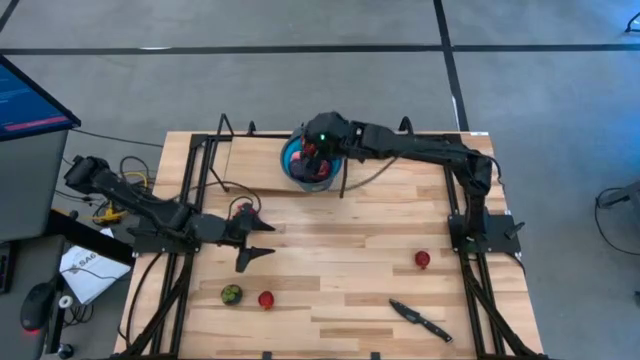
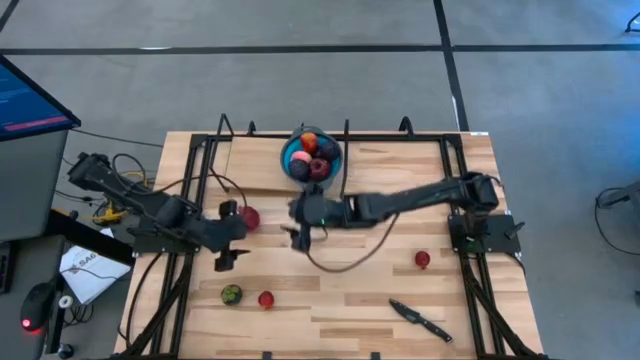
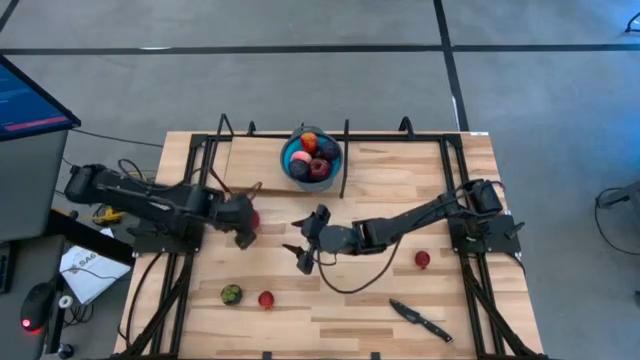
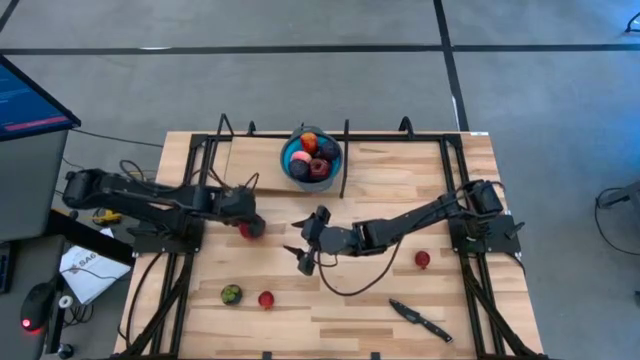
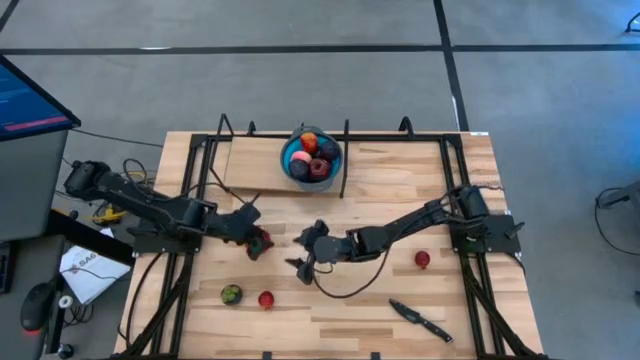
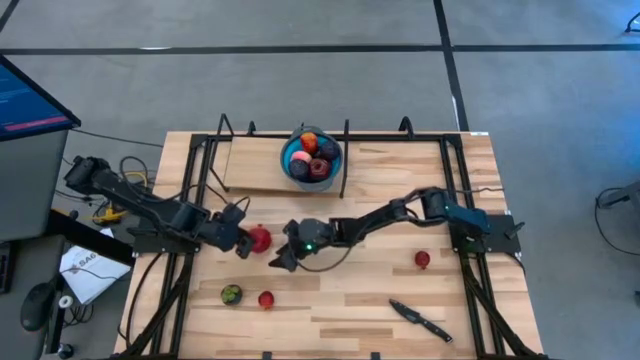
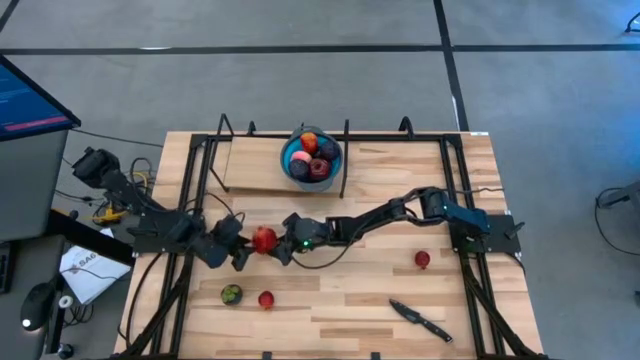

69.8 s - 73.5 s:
Task: Pick & Place Fruit
Put the top left red pomegranate into the blue strainer bowl on the shelf

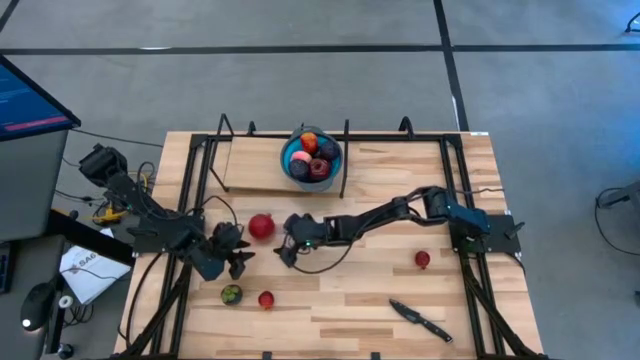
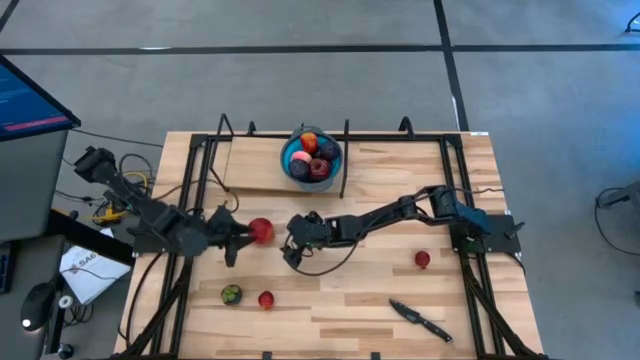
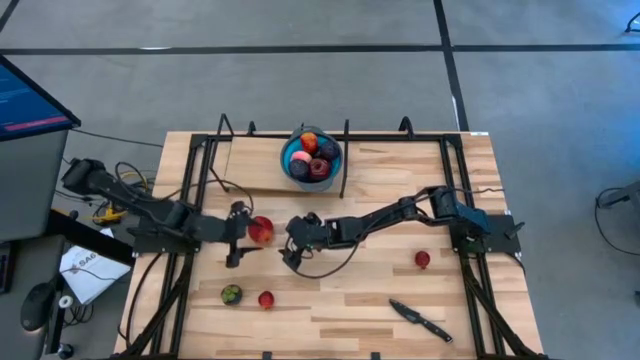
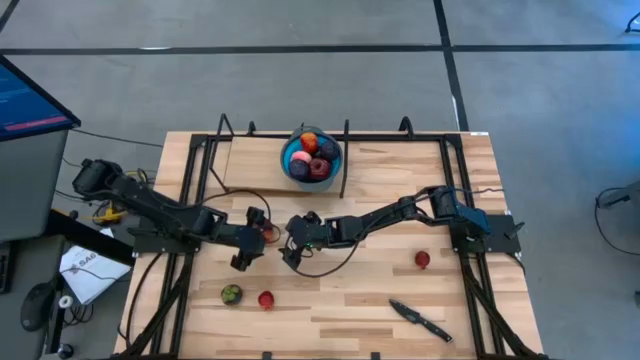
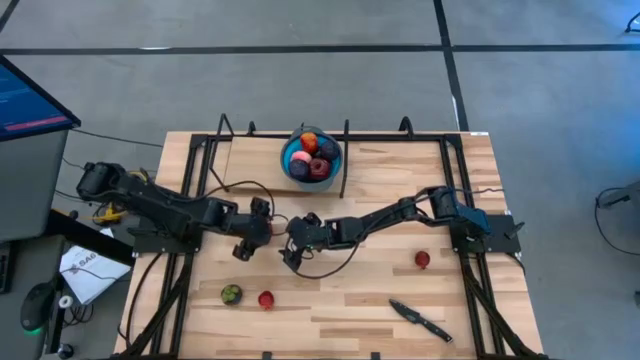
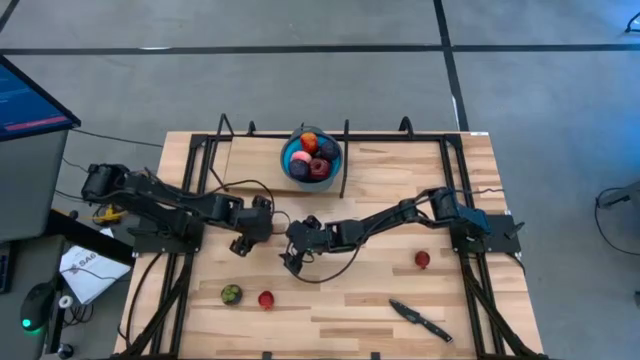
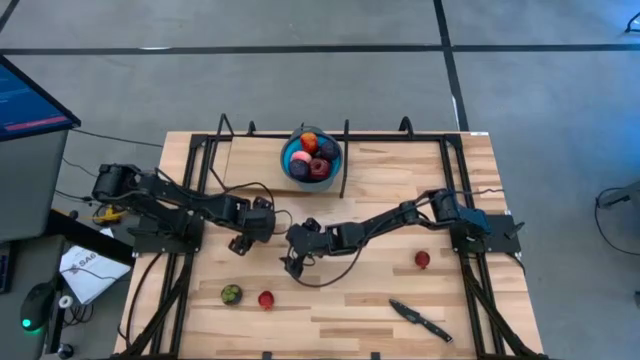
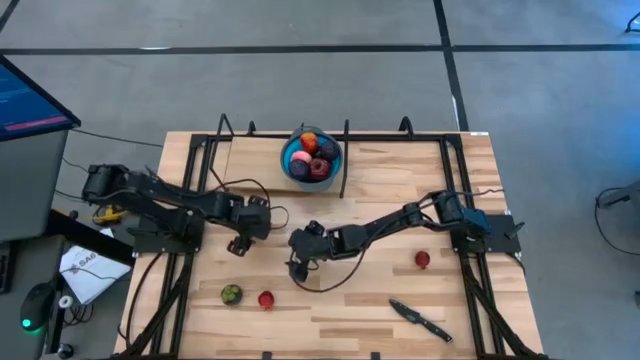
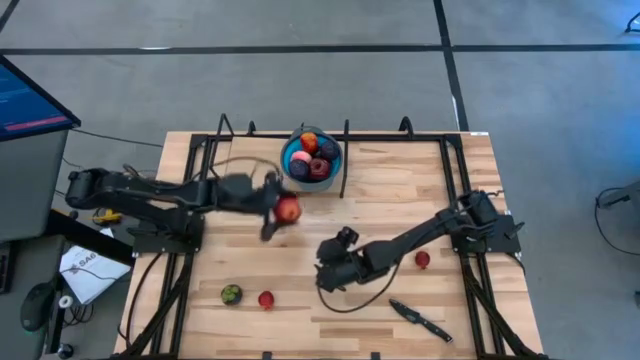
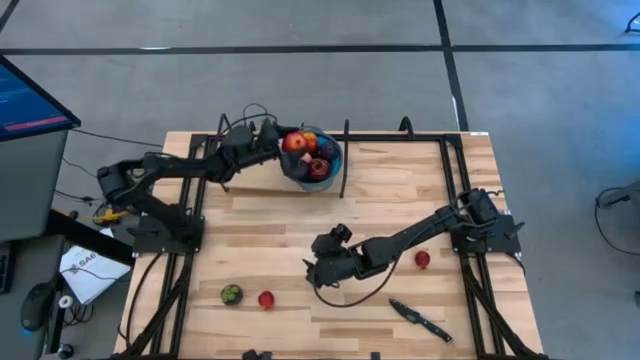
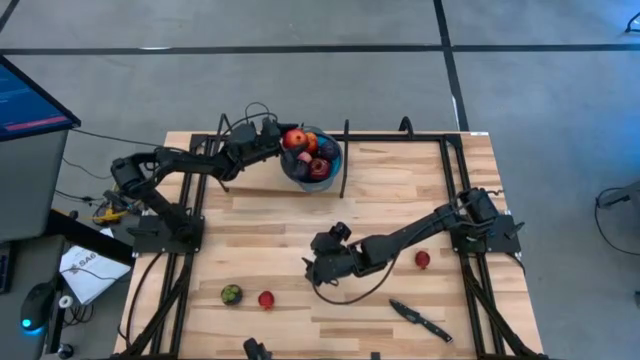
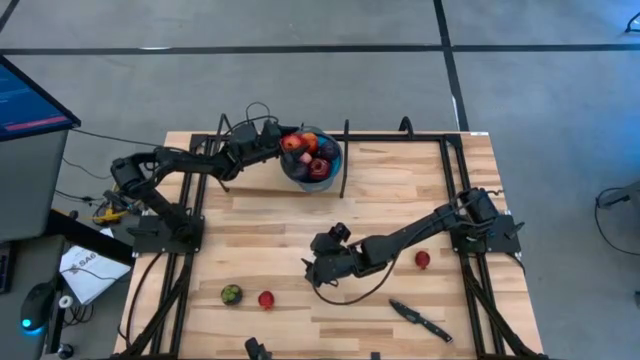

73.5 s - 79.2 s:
Put the top left red pomegranate into the blue strainer bowl on the shelf

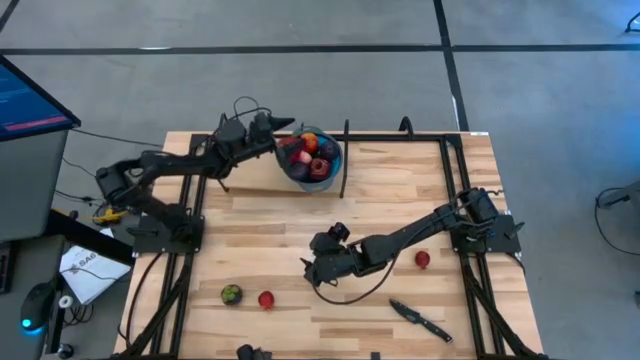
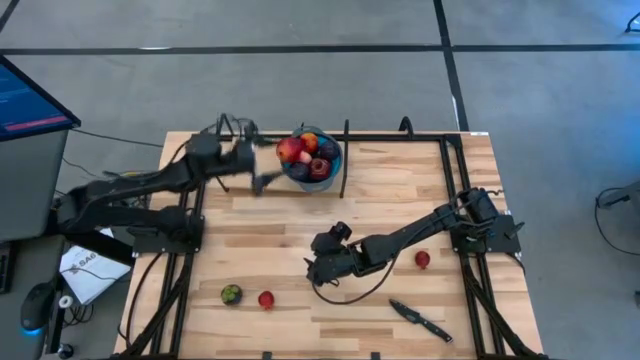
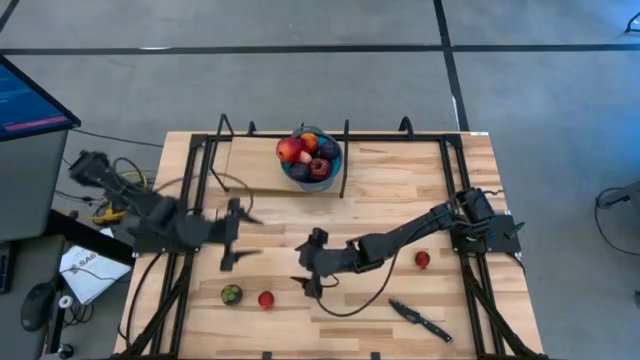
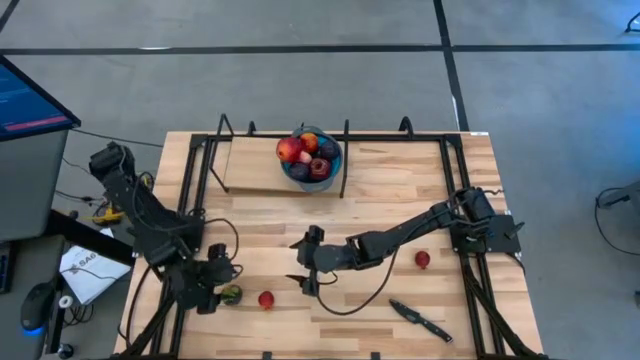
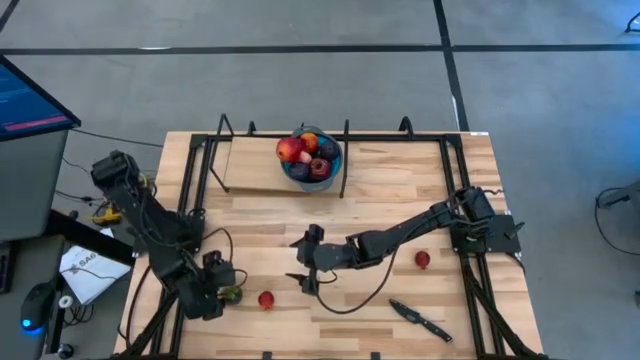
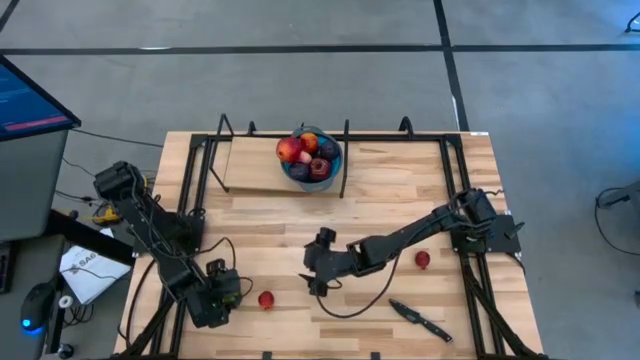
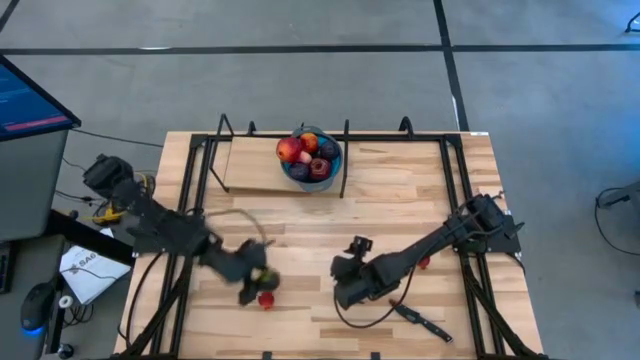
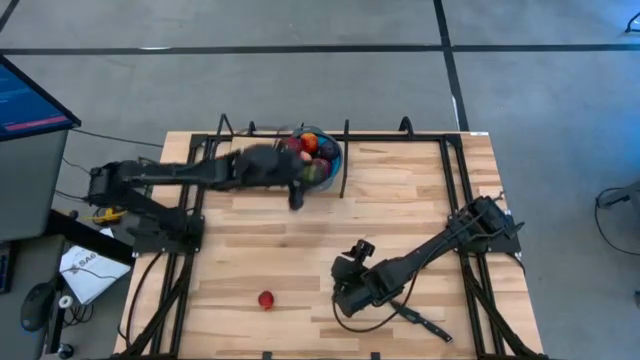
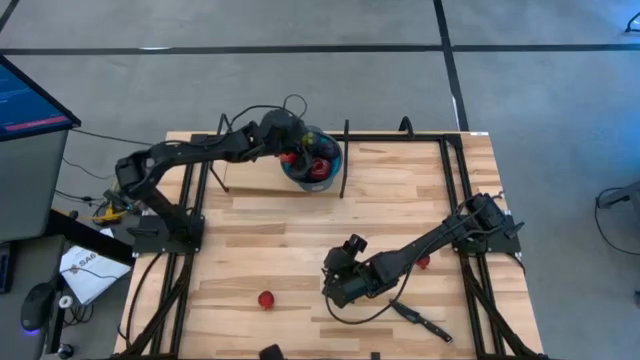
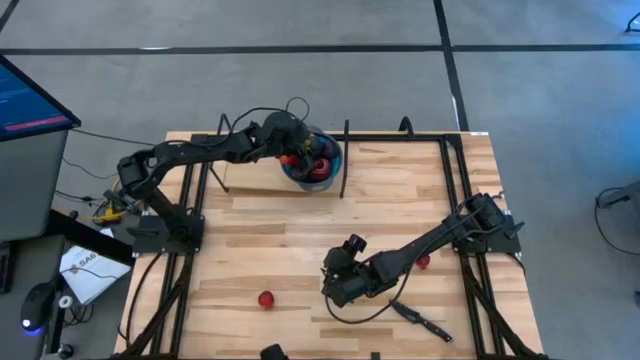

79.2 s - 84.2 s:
Put the dark purple mangosteen into the blue strainer bowl on the shelf

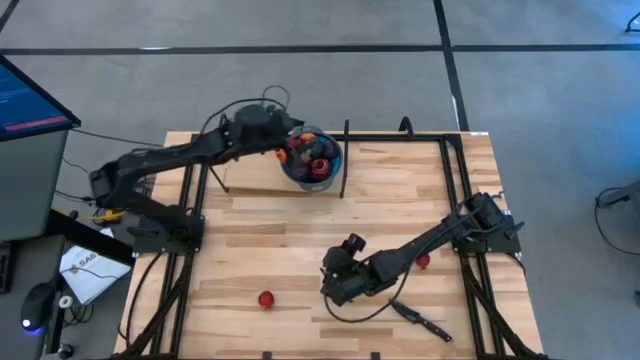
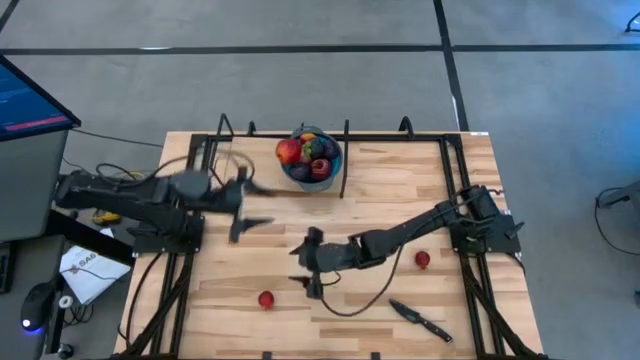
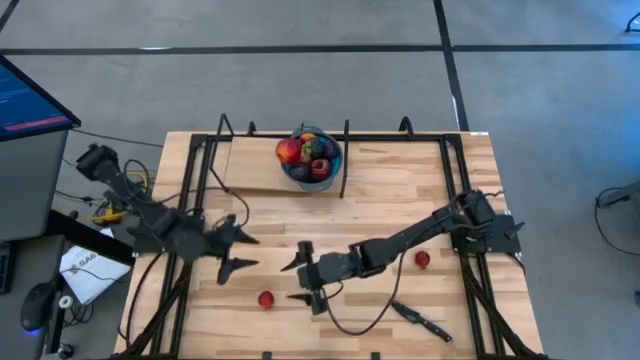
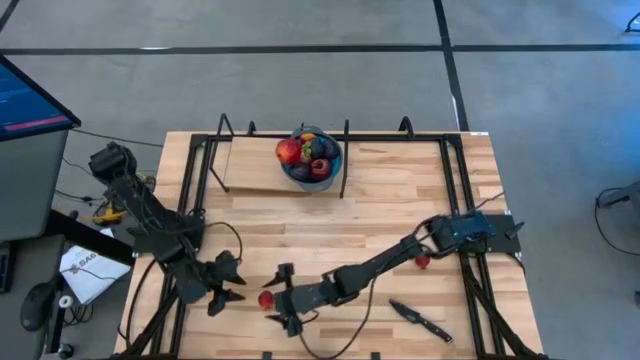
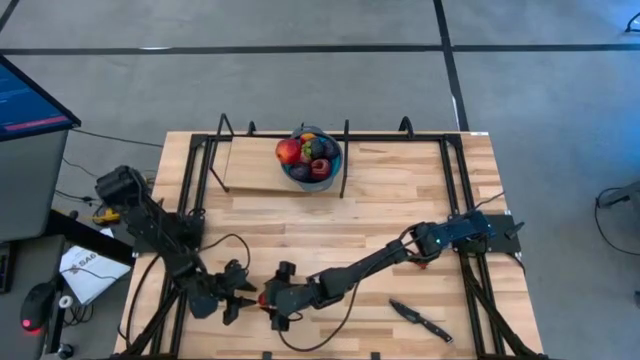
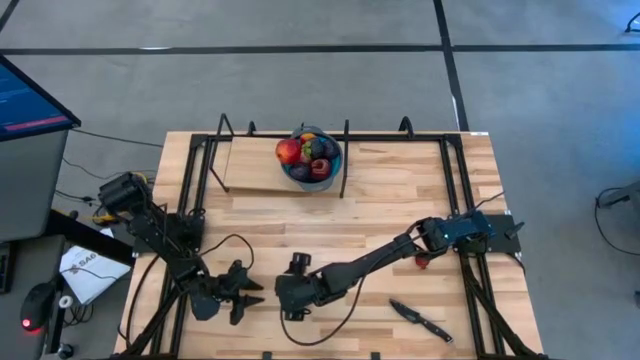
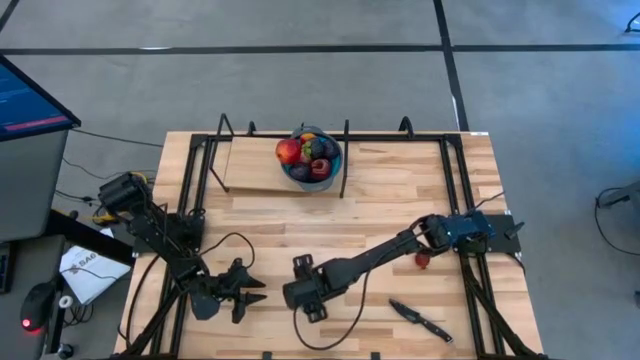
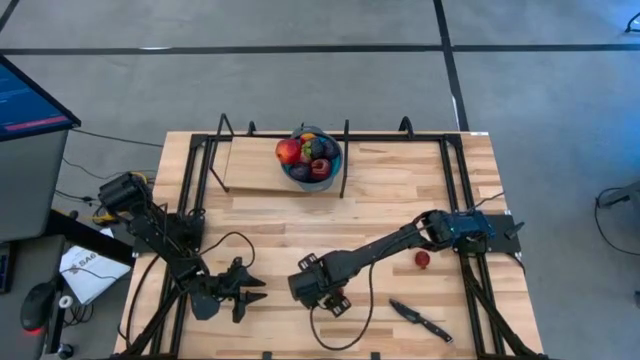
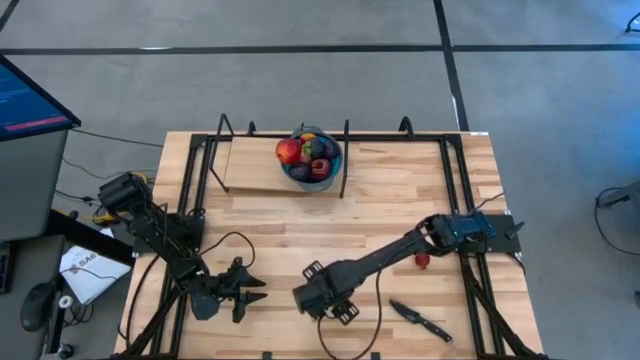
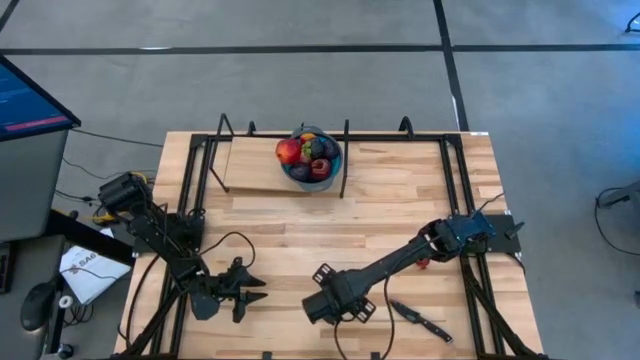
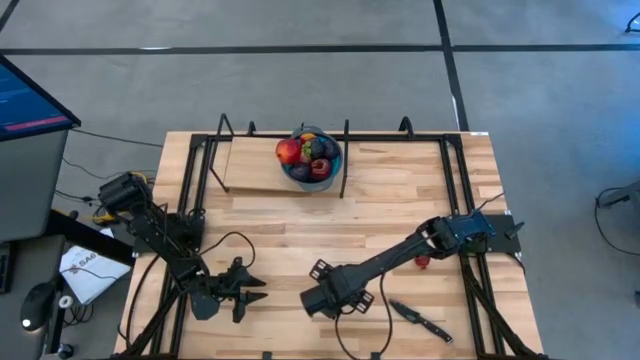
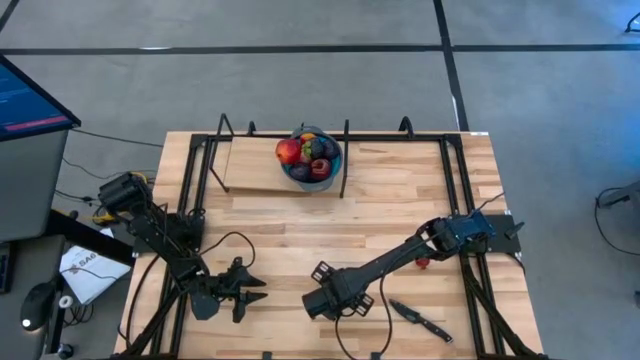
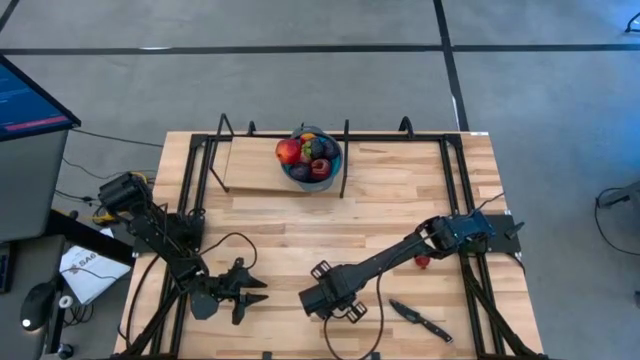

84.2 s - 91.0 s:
Put the left red pomegranate into the blue strainer bowl on the shelf
